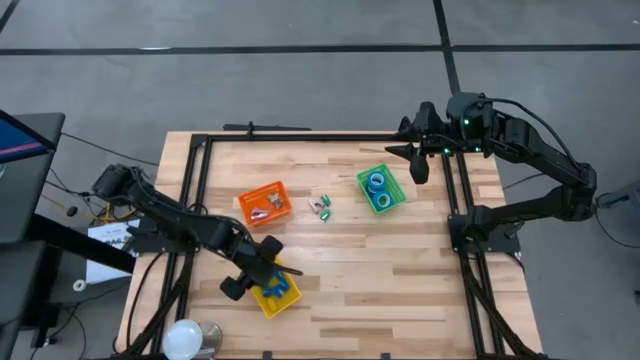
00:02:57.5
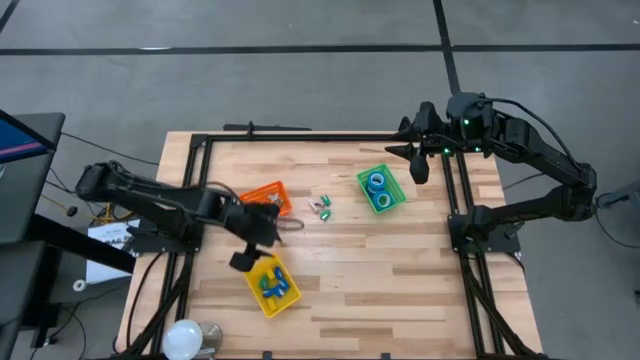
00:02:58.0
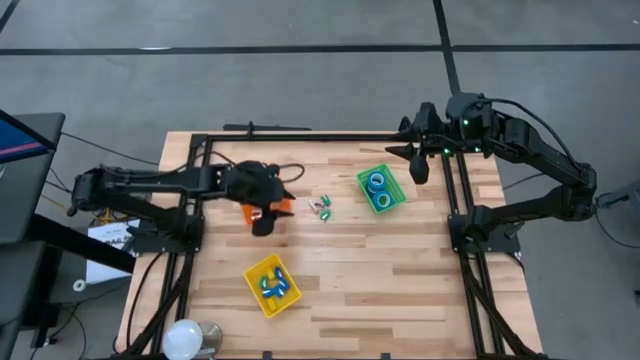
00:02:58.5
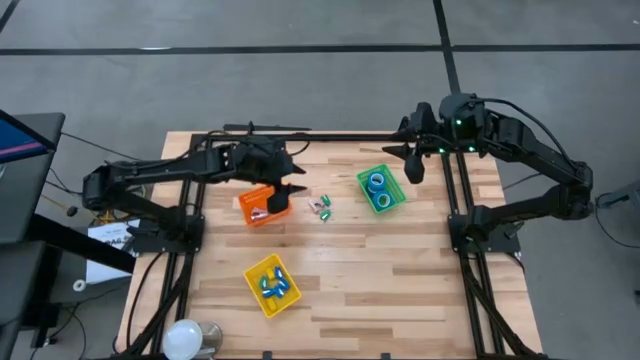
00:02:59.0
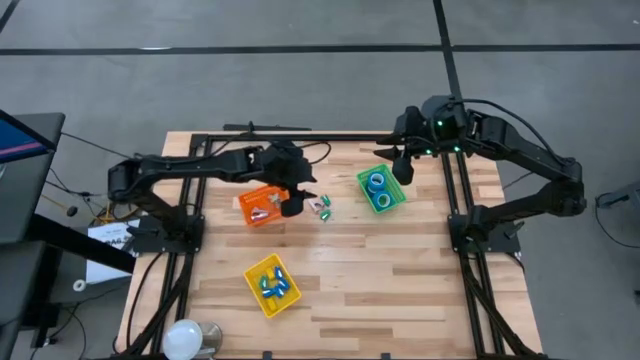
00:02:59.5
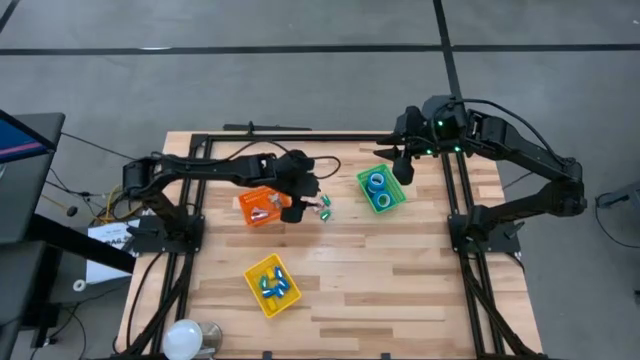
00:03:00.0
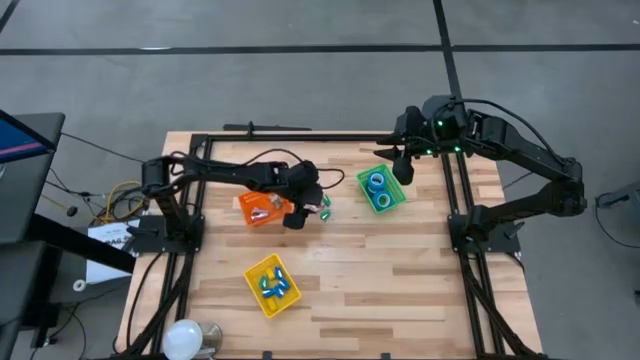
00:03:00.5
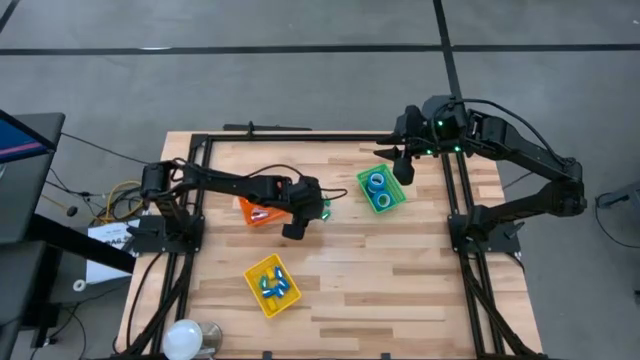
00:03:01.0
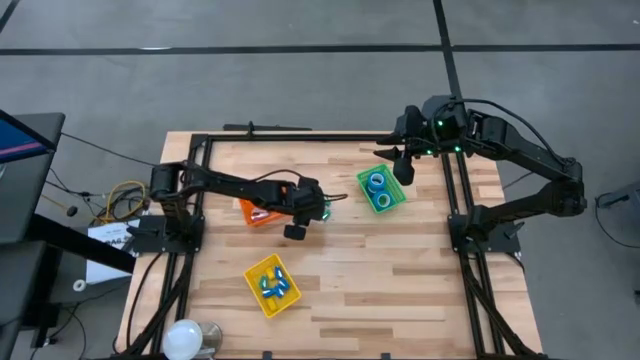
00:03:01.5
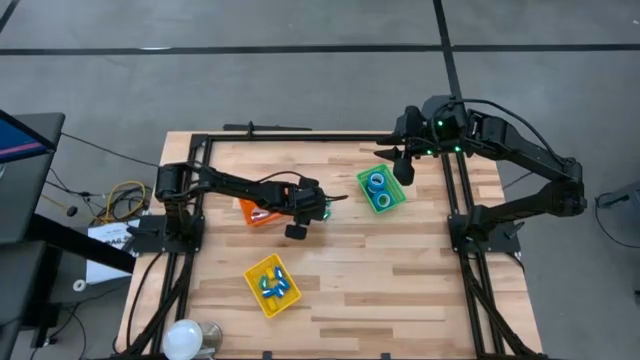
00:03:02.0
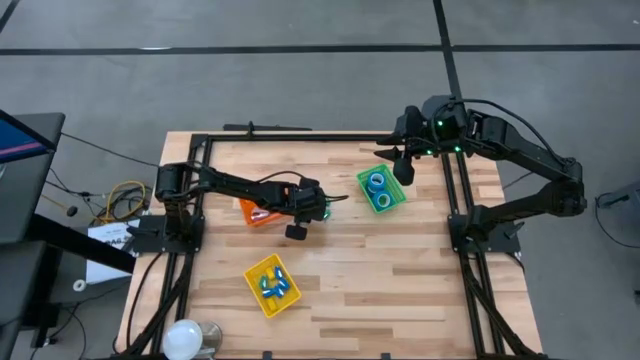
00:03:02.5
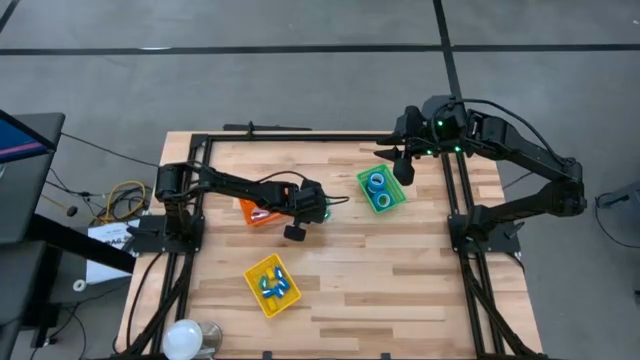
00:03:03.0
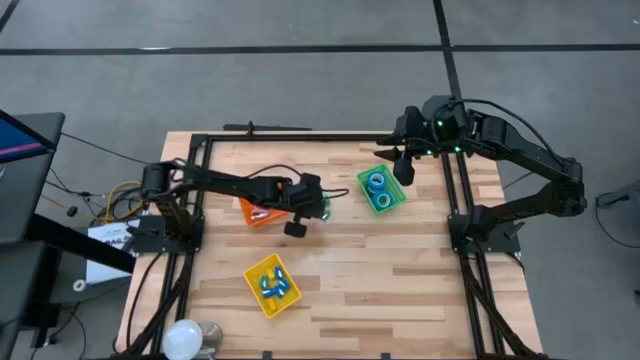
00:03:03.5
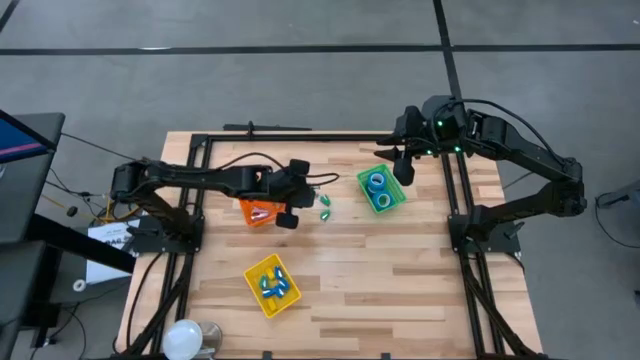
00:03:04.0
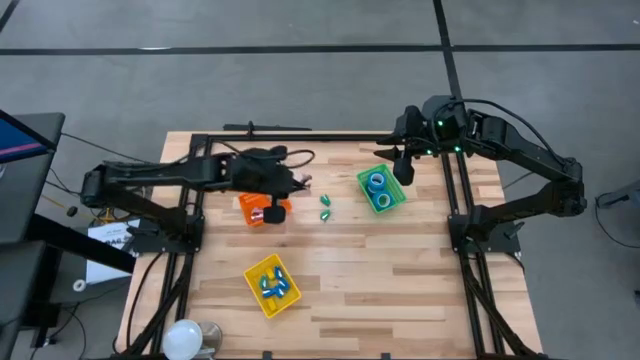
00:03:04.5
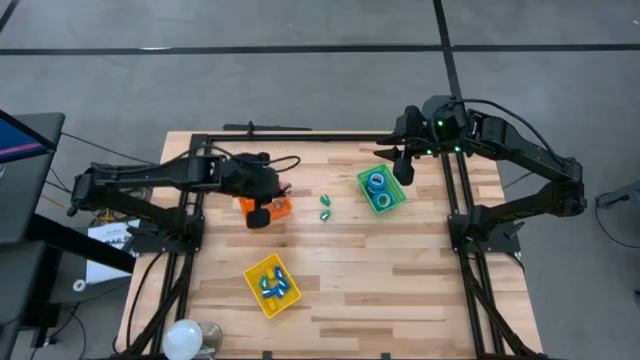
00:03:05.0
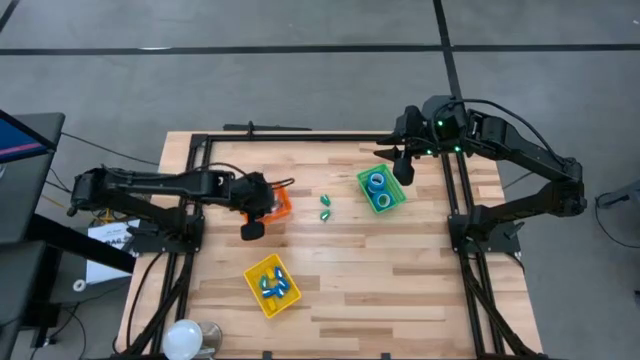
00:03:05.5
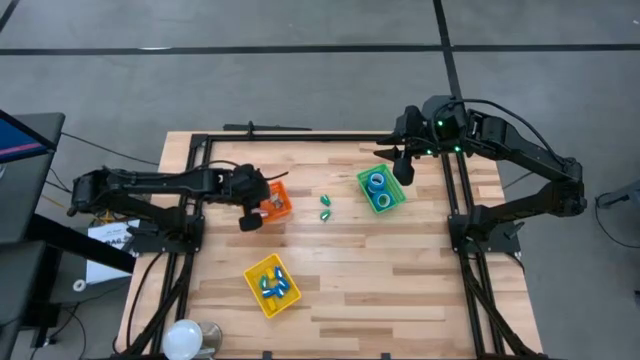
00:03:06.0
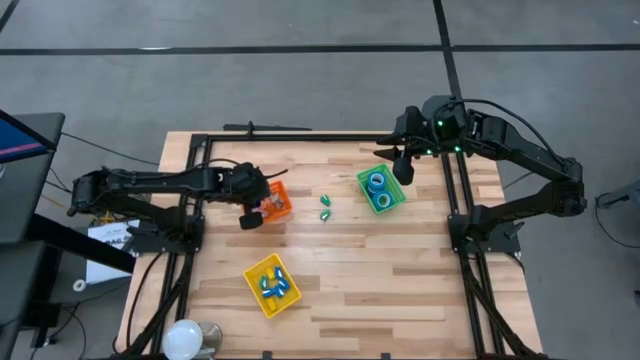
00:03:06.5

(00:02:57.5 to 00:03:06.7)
Task: Pick and place Stapler, Stapler remover, tape
Put the pink staple remover into the orange basket

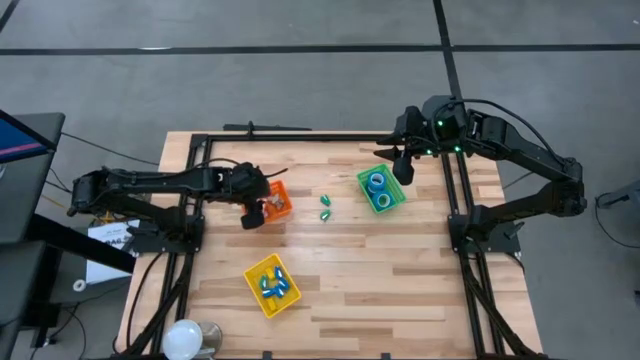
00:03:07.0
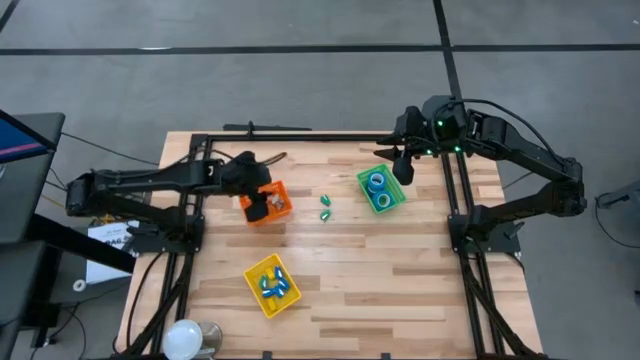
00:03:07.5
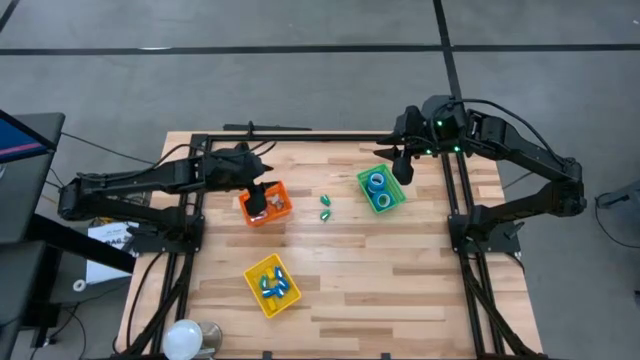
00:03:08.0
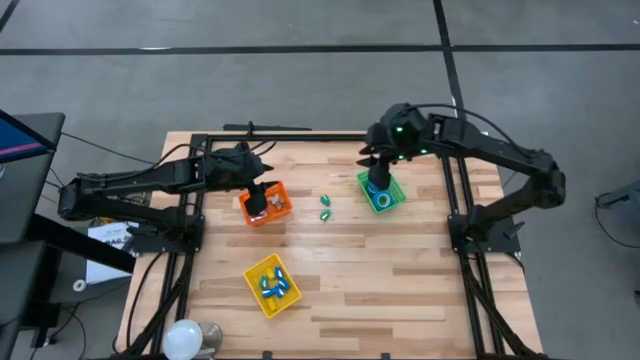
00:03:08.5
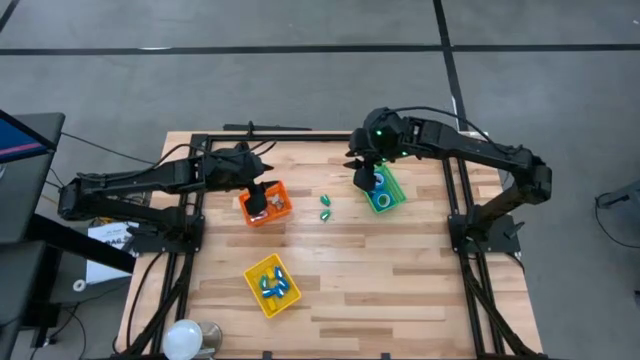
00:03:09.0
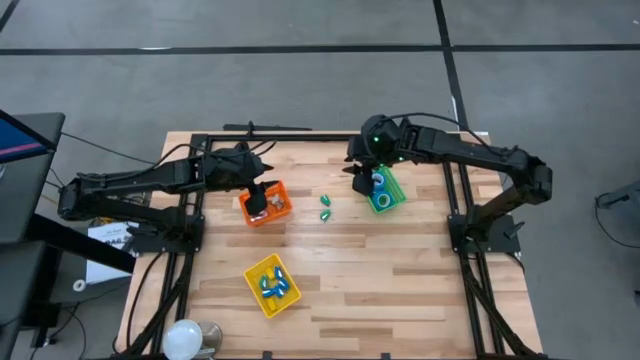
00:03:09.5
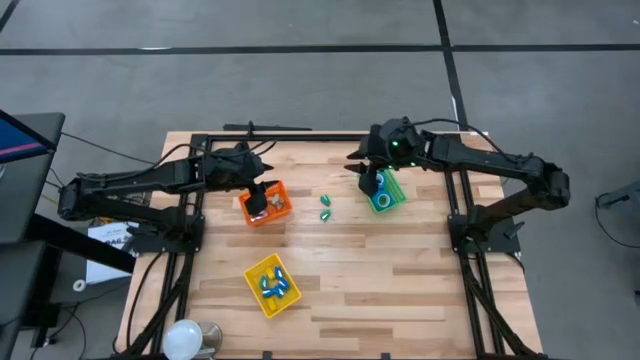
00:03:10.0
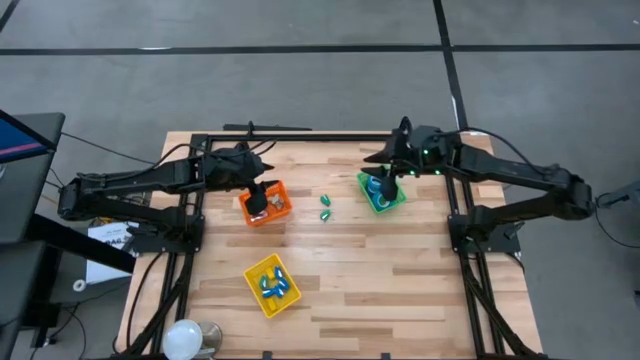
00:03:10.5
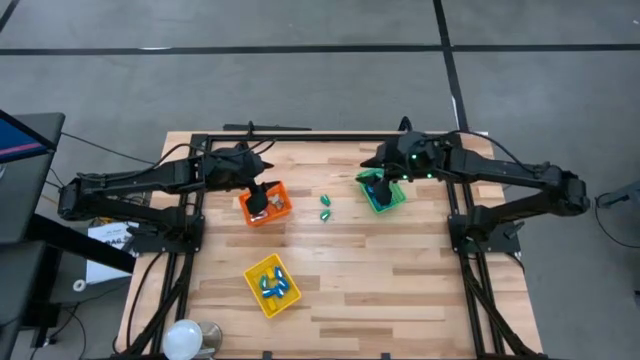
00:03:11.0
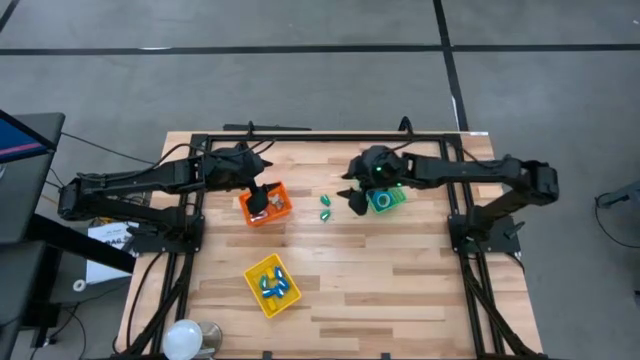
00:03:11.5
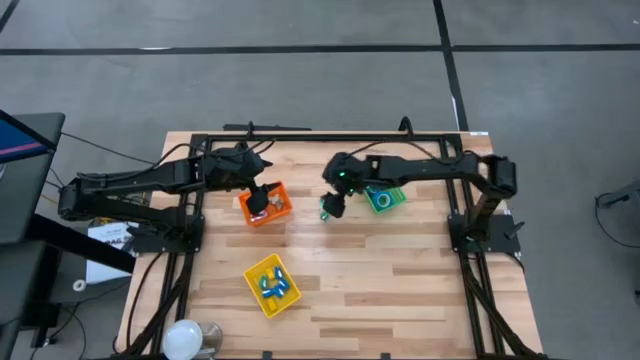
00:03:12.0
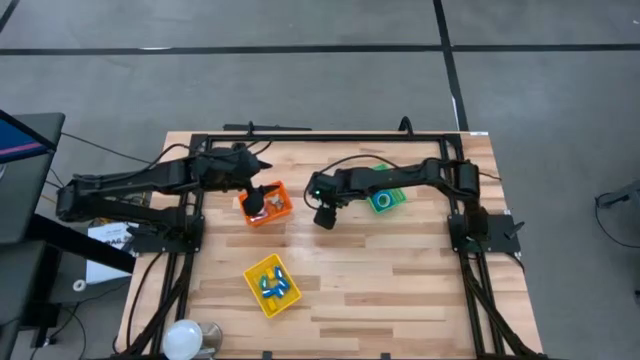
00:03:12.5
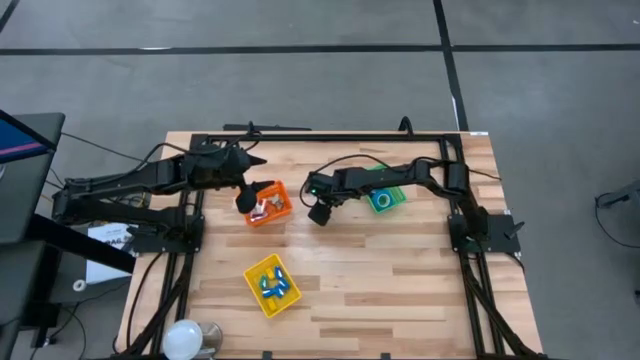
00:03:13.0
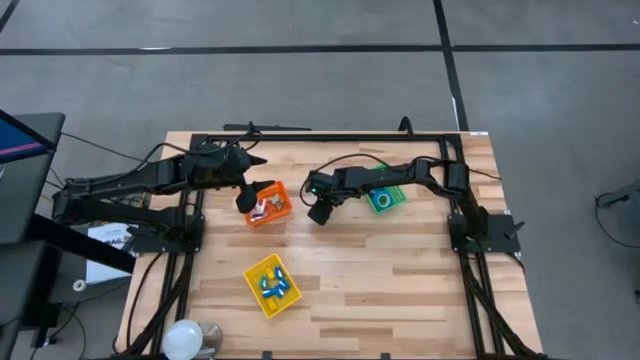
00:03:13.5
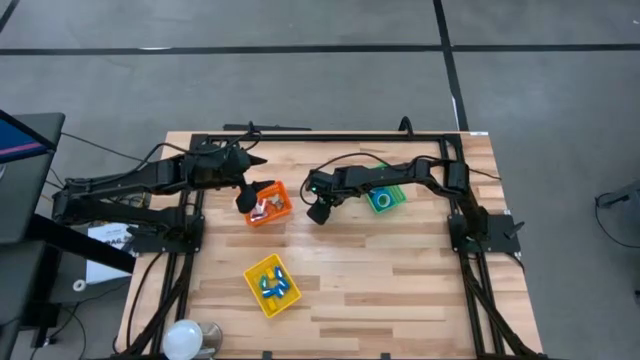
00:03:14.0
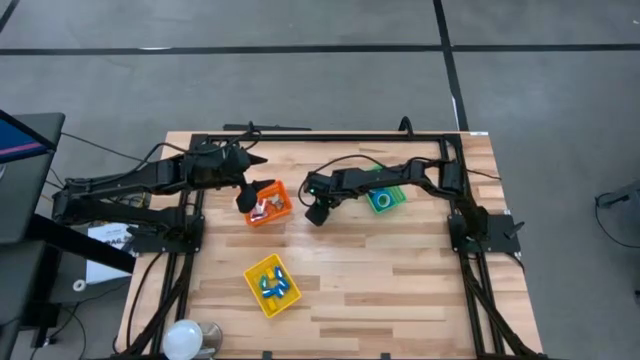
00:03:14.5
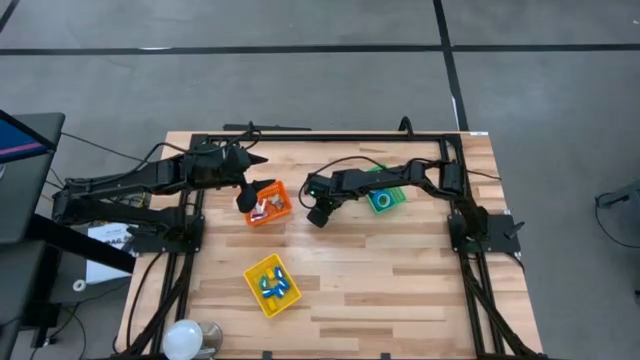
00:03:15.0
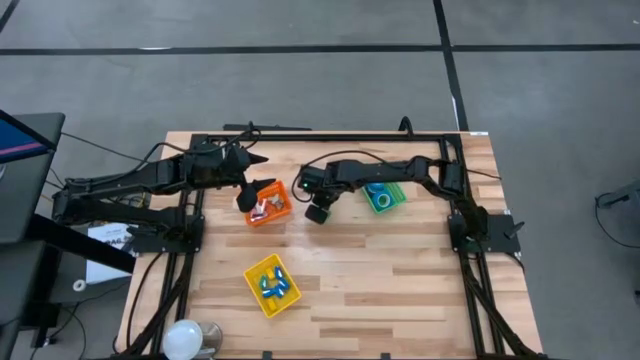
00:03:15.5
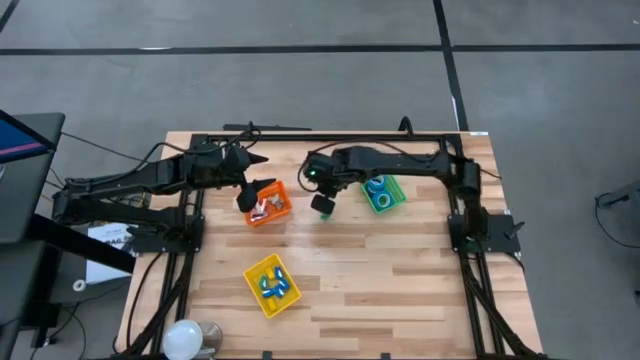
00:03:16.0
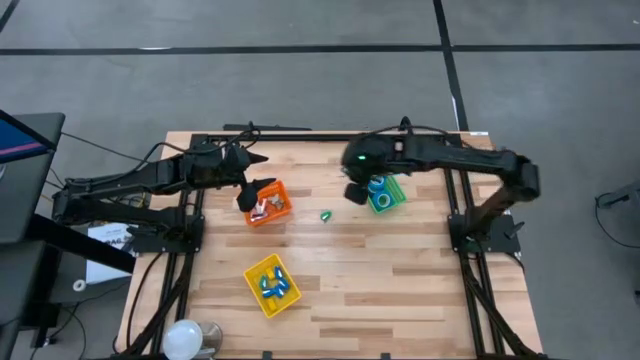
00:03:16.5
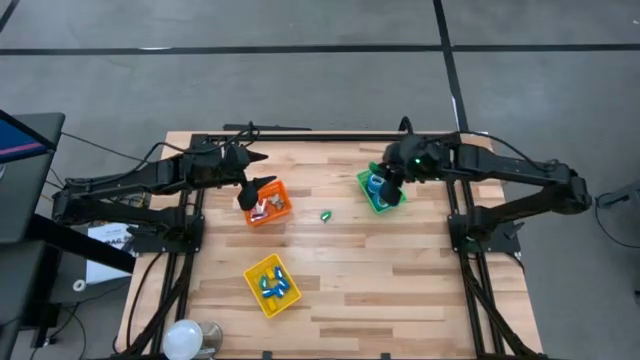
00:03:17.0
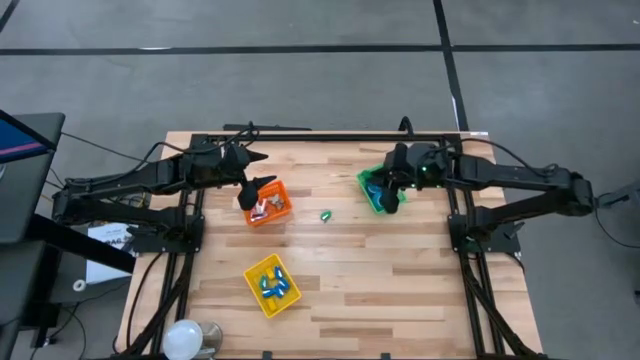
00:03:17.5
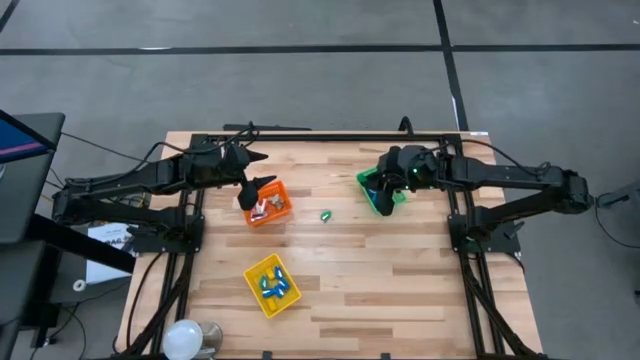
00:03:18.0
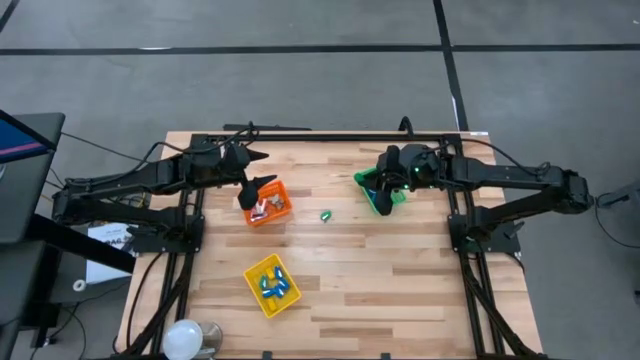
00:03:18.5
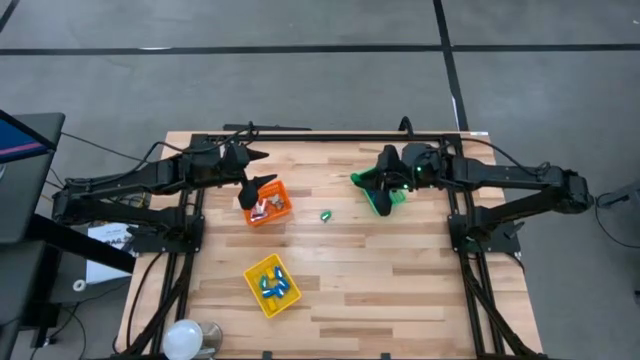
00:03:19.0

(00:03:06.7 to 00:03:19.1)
Put the green stapler into the yellow basket
